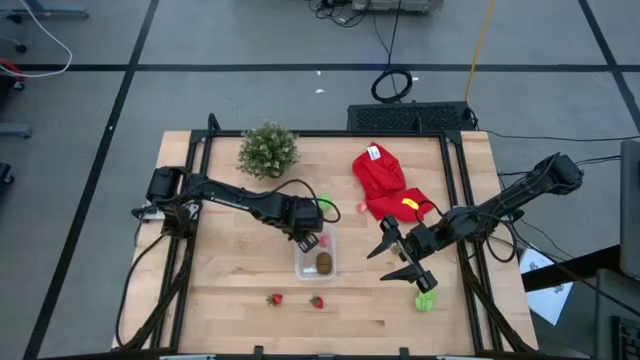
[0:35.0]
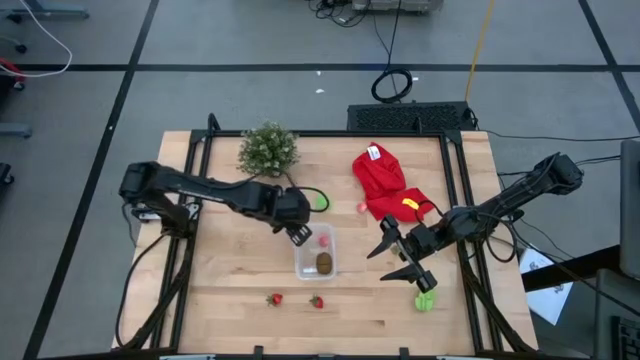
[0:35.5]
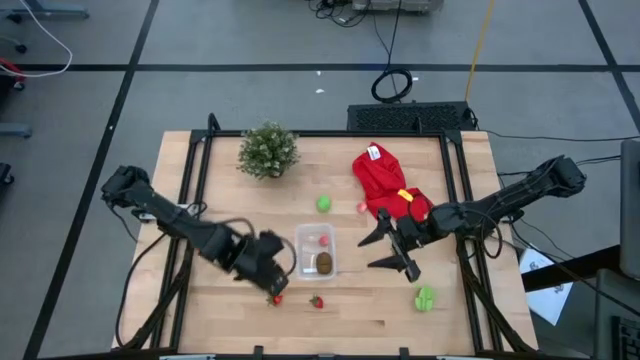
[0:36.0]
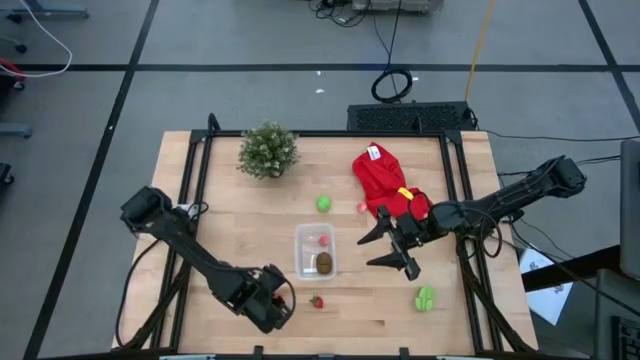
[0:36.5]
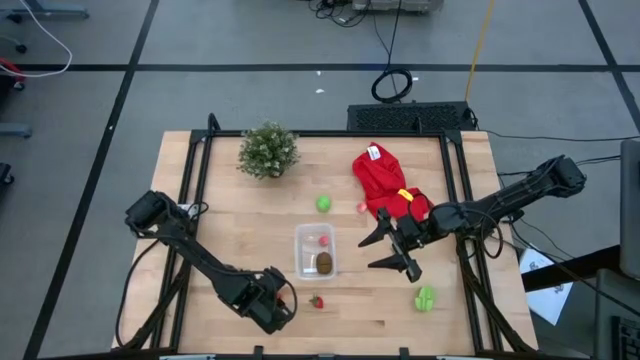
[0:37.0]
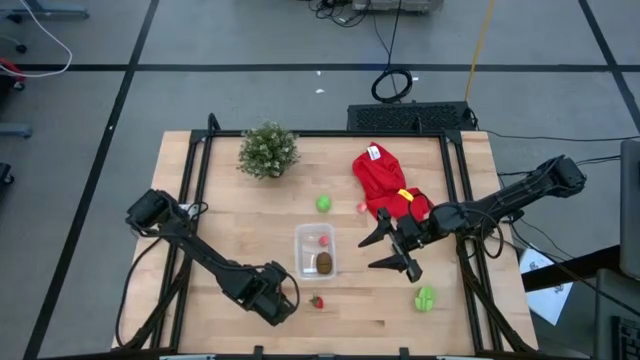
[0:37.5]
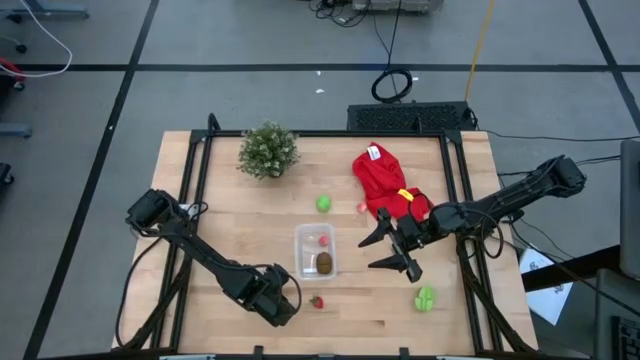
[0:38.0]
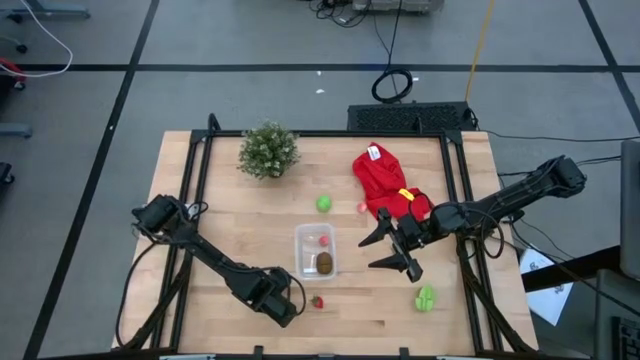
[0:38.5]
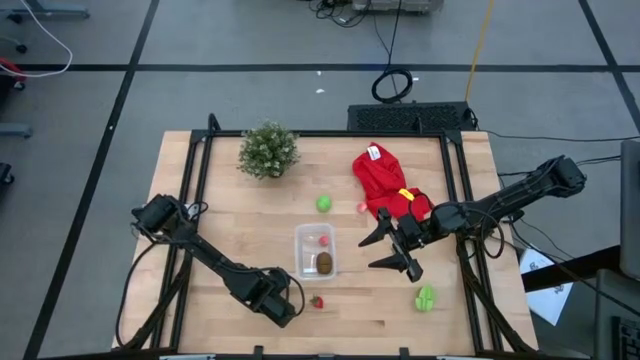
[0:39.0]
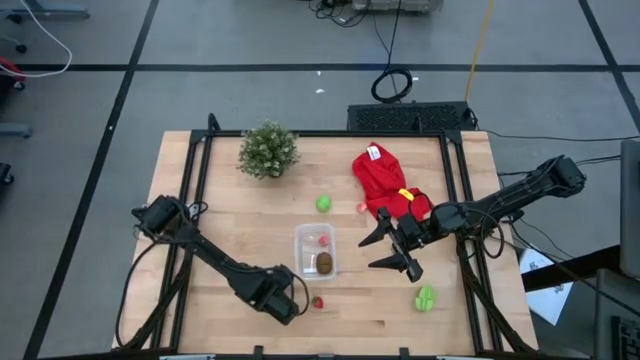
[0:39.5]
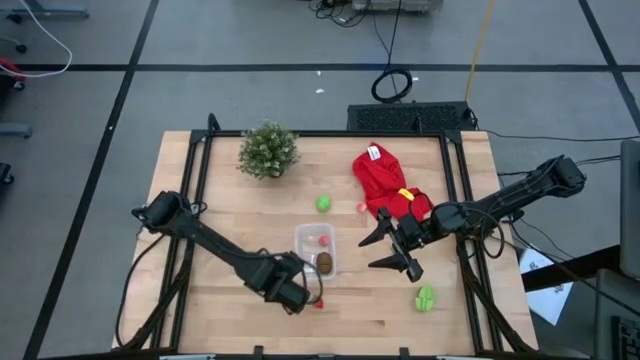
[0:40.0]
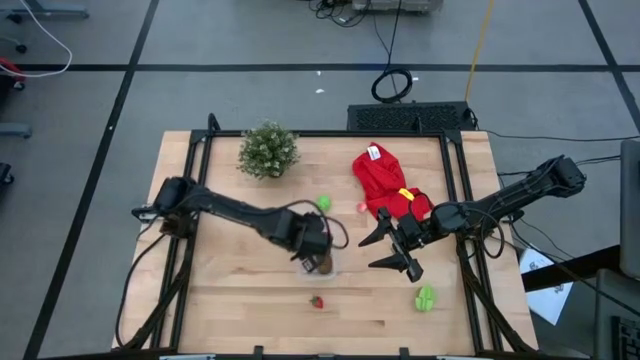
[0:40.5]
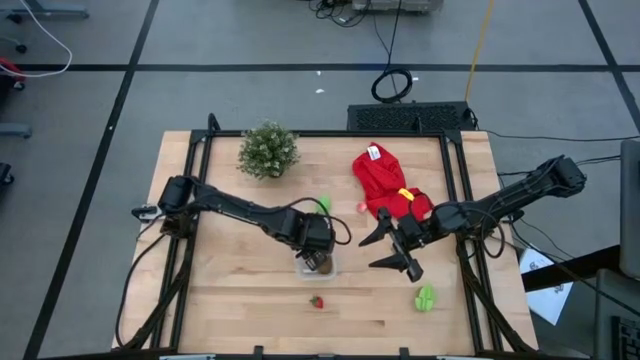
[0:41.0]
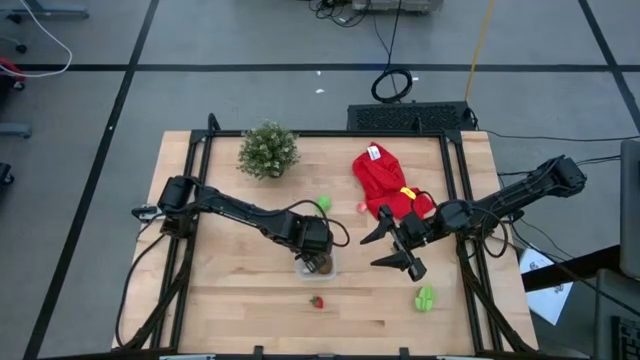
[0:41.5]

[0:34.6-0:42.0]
Task: Pick and placing Produce into tupperware
Put the bottom left red strawberry into the transparent bin

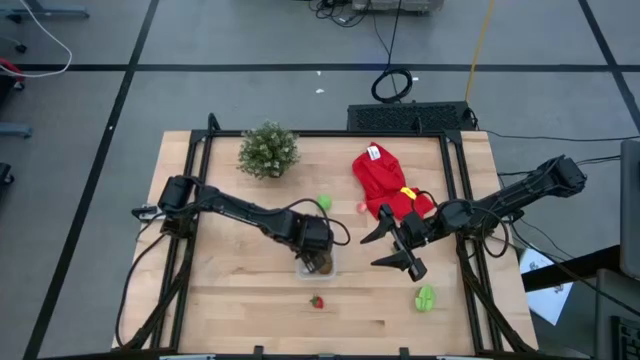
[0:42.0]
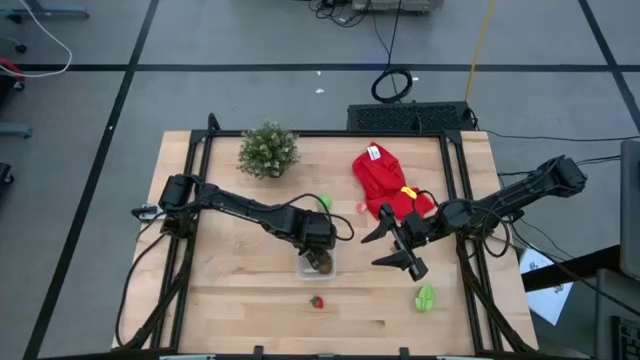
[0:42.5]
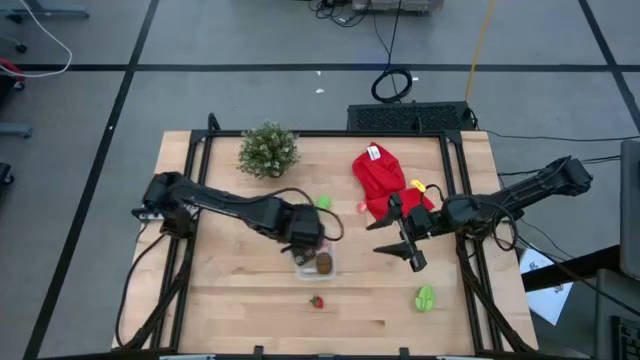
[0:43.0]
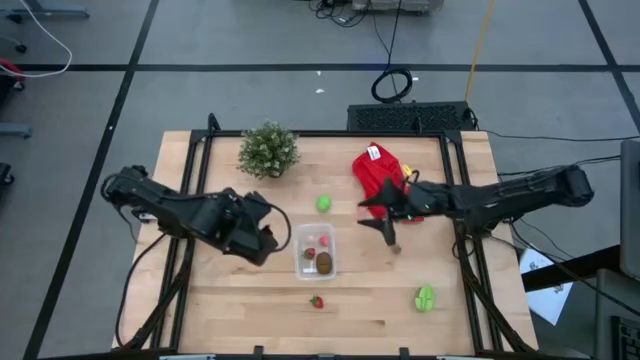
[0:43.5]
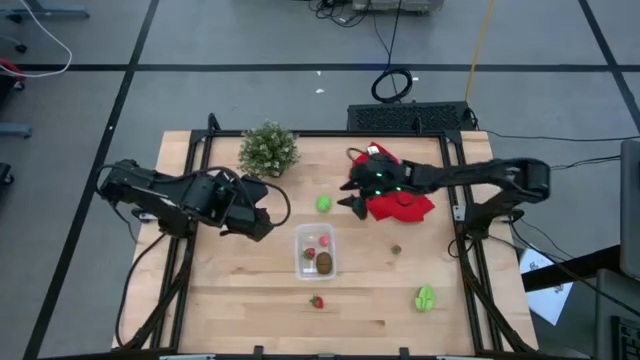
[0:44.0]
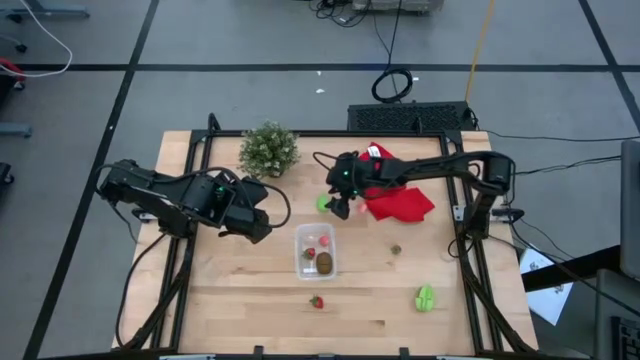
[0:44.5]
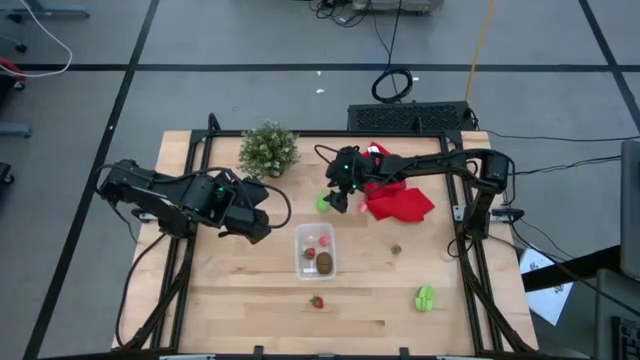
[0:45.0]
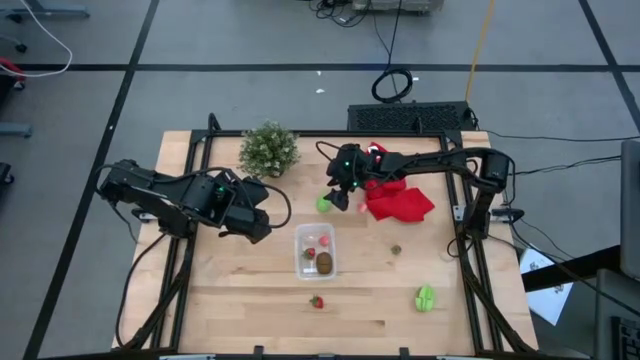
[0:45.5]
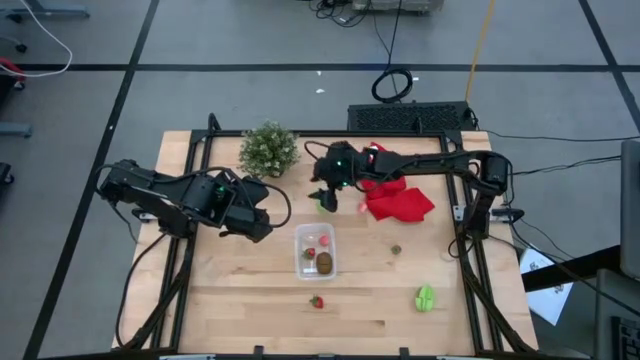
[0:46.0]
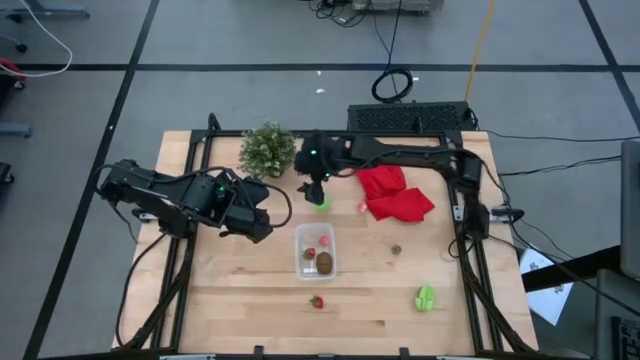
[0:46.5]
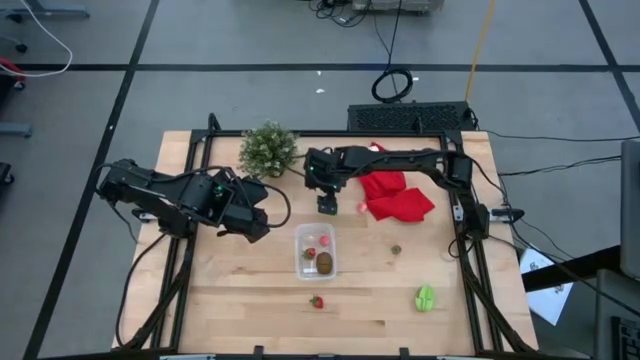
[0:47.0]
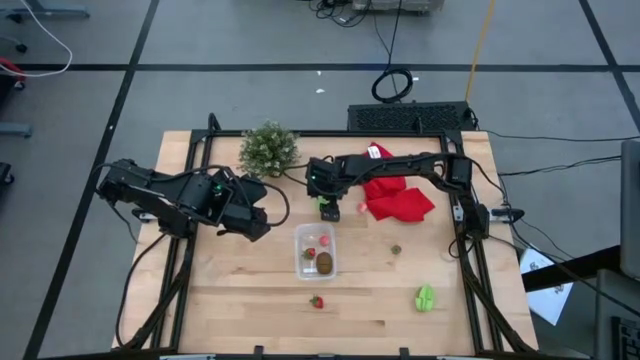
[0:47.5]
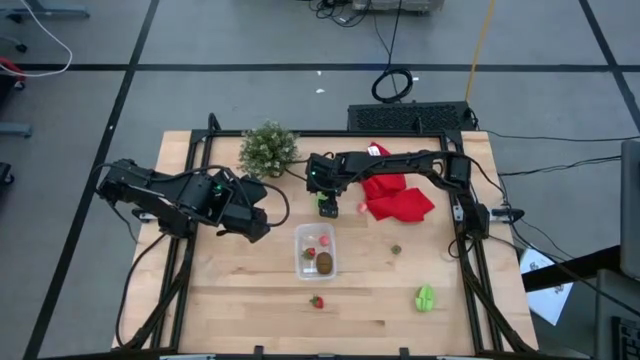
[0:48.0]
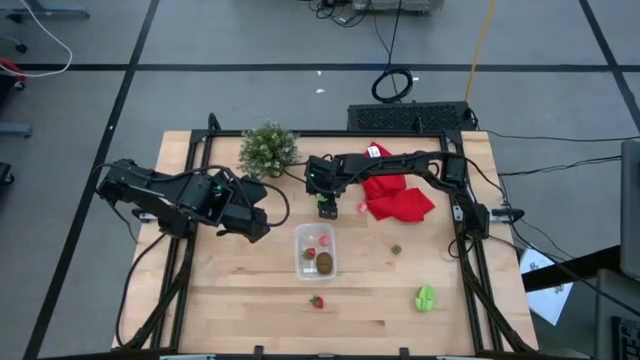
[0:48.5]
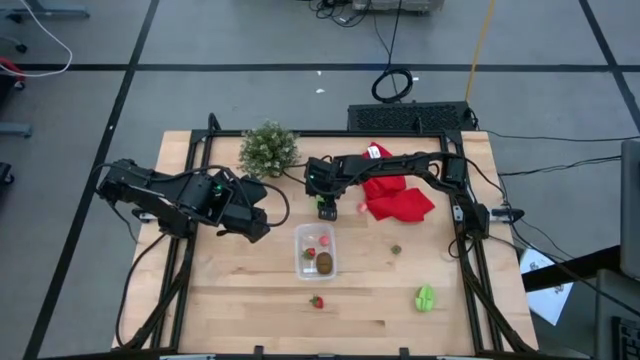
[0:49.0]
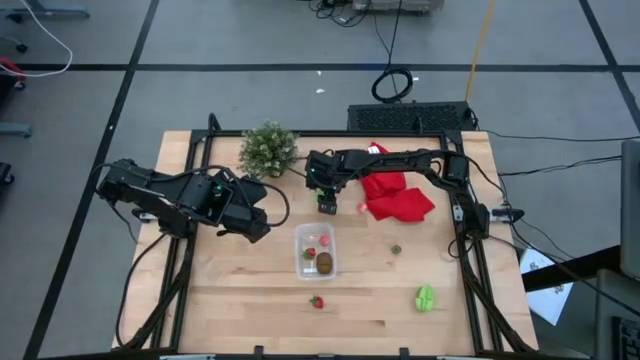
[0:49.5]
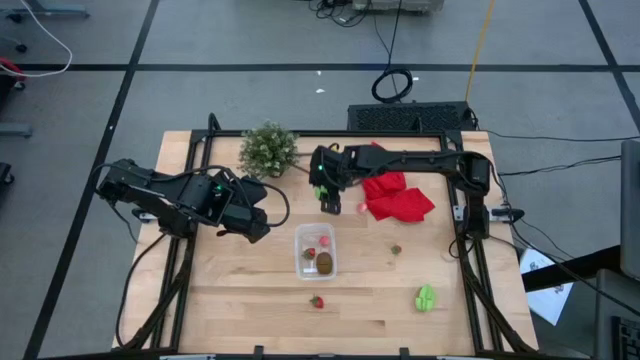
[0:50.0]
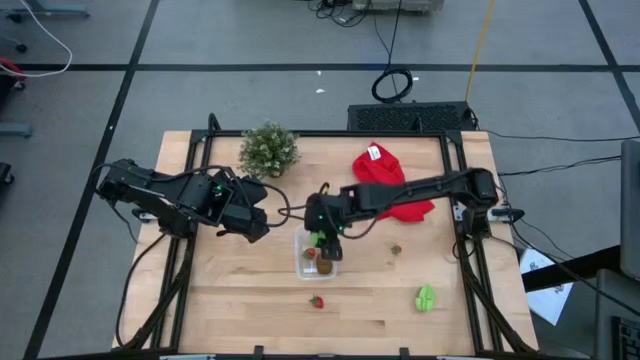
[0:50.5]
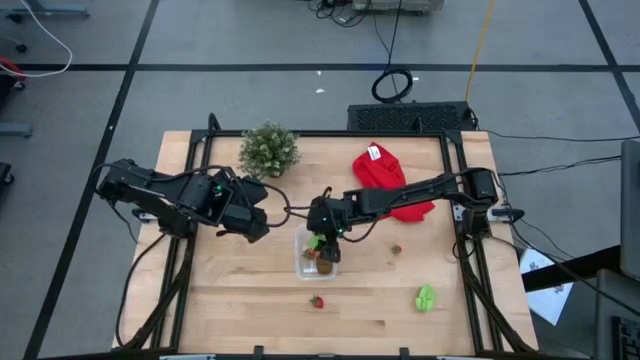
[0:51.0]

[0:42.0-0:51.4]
Put the green lime into the transparent bin

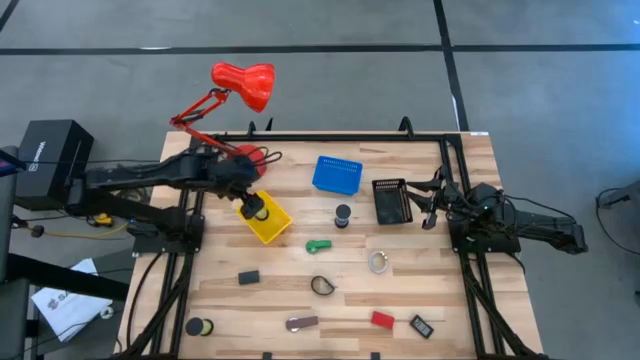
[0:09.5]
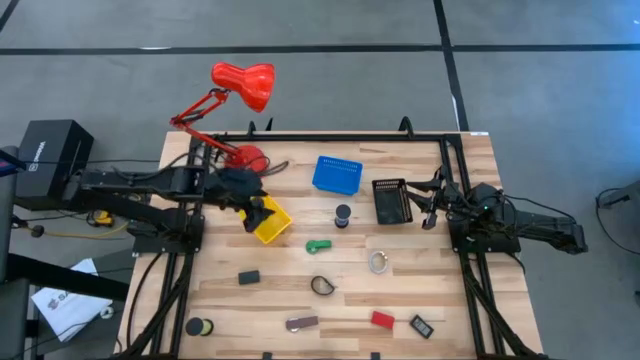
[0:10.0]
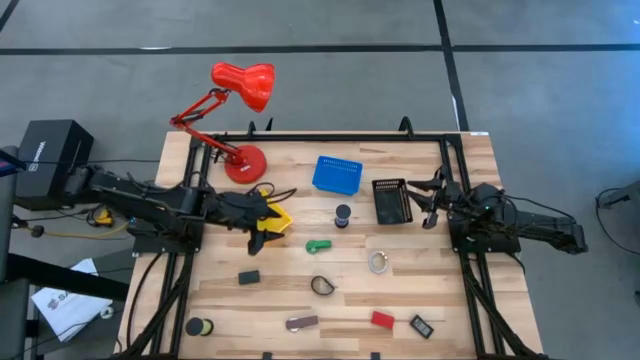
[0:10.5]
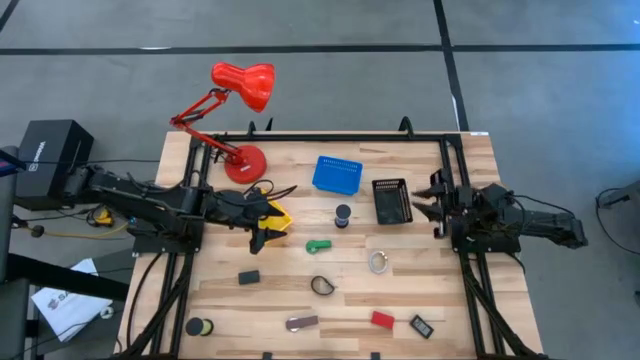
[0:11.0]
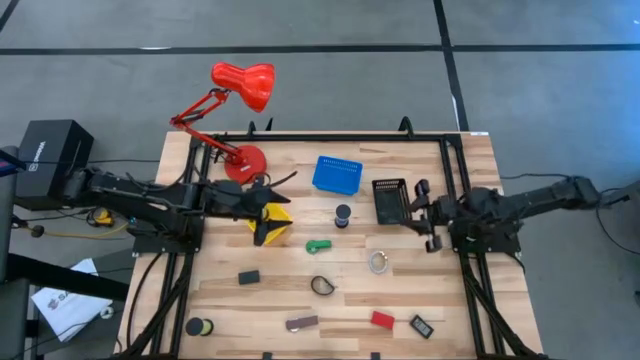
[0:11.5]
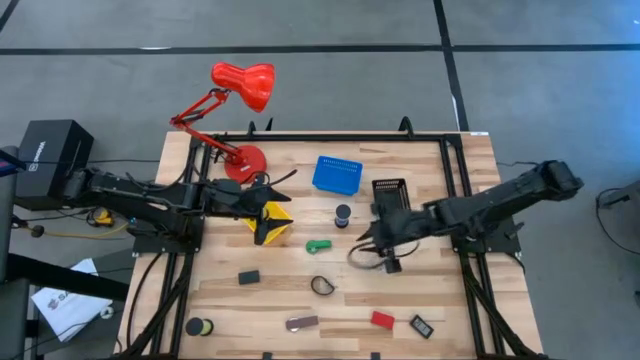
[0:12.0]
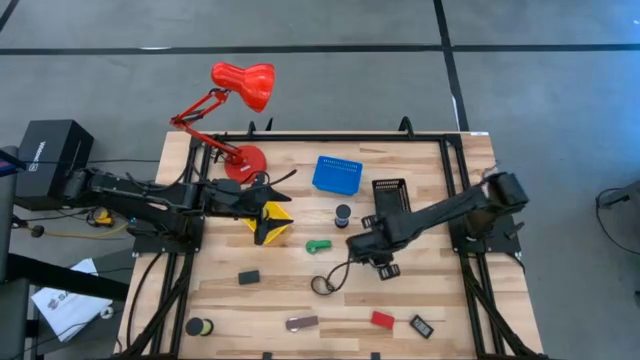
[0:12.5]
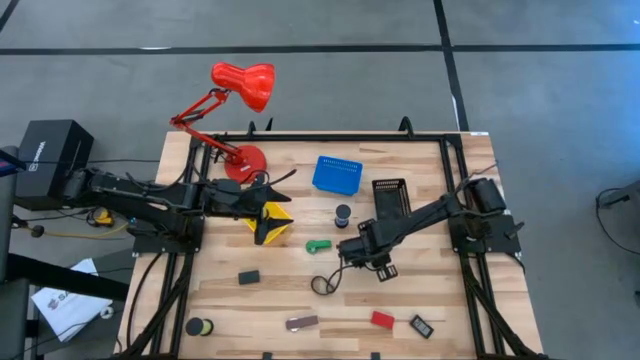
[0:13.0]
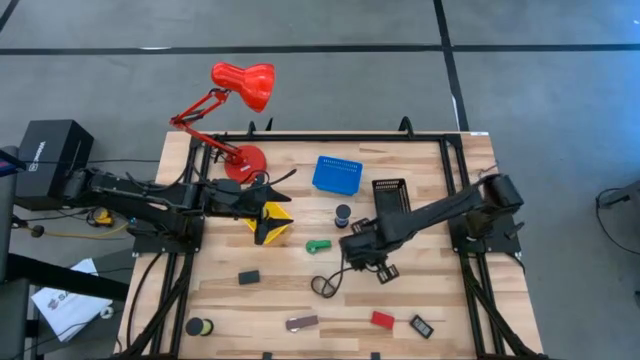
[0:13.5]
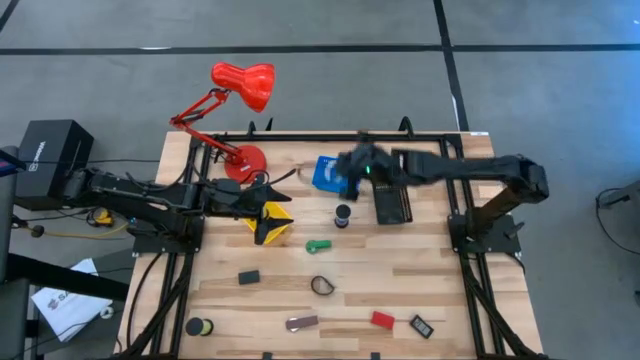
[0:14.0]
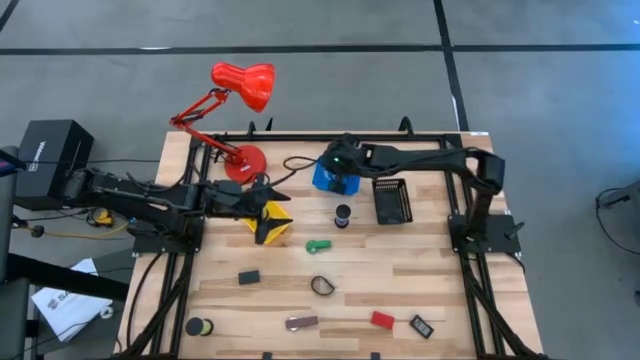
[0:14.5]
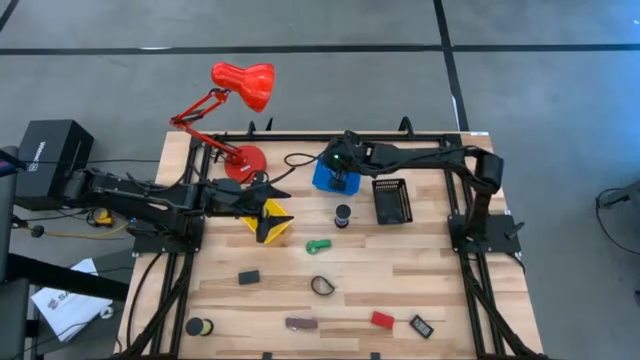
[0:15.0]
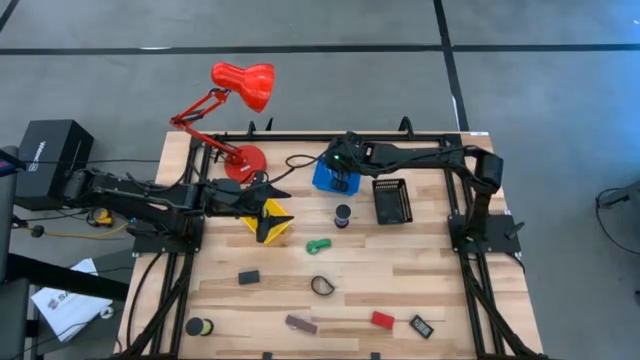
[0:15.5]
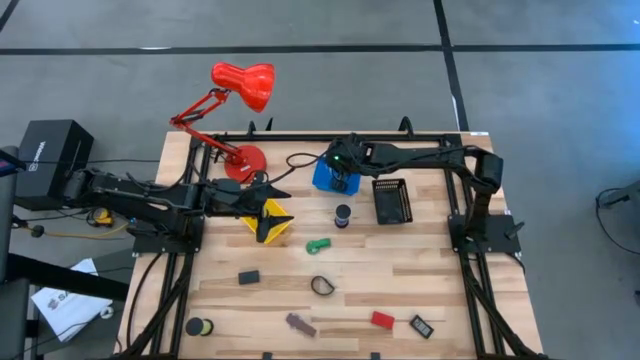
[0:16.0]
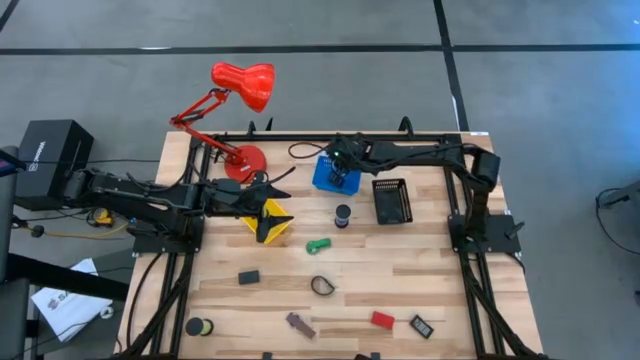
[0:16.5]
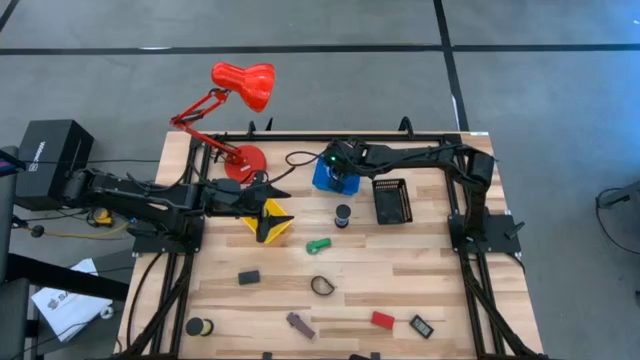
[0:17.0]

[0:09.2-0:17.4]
Task: Pick & Place Office items
Put the white wrist watch into the blue bin
